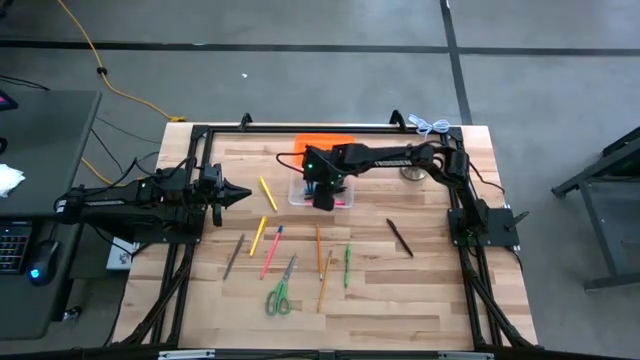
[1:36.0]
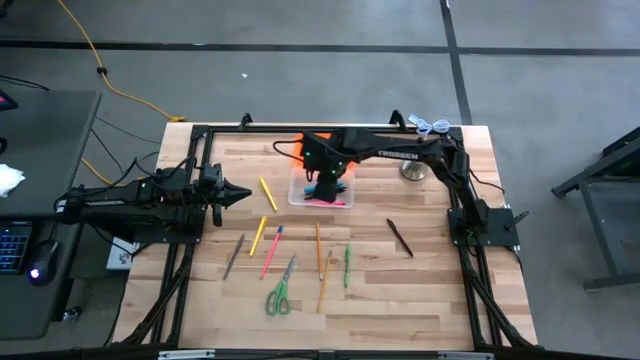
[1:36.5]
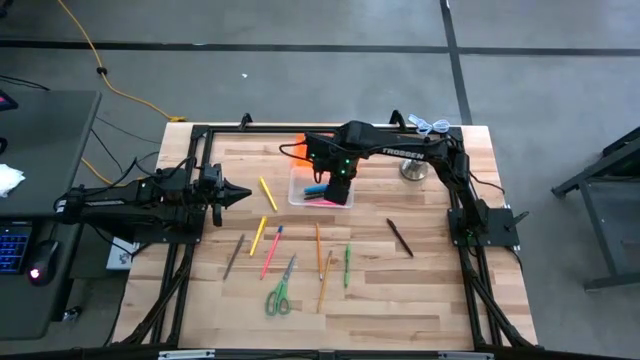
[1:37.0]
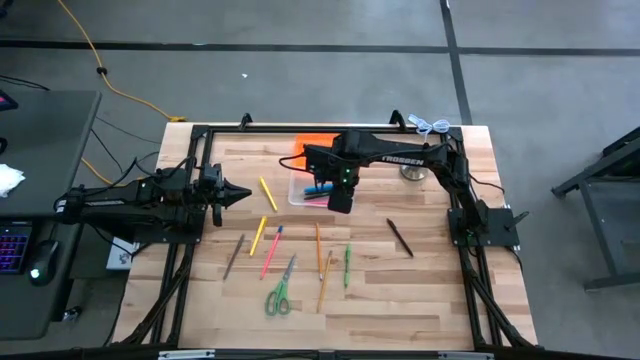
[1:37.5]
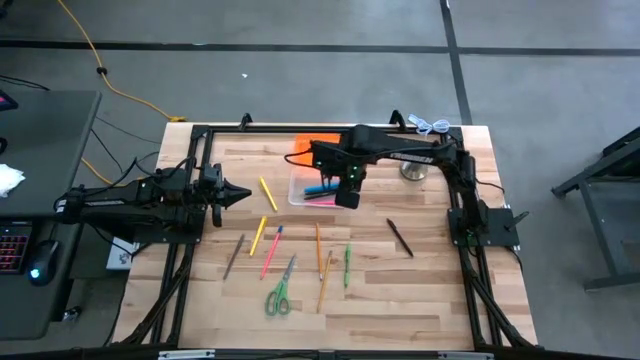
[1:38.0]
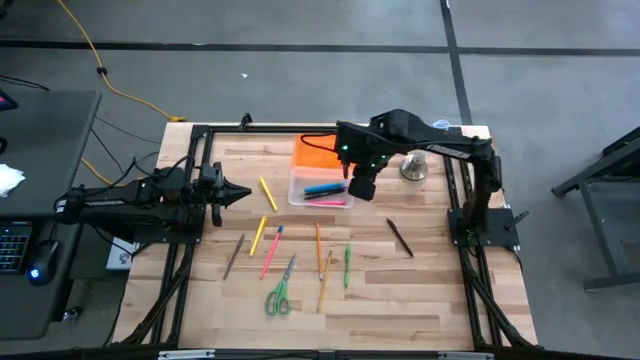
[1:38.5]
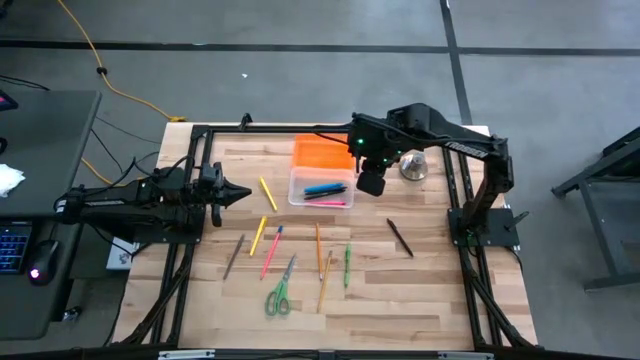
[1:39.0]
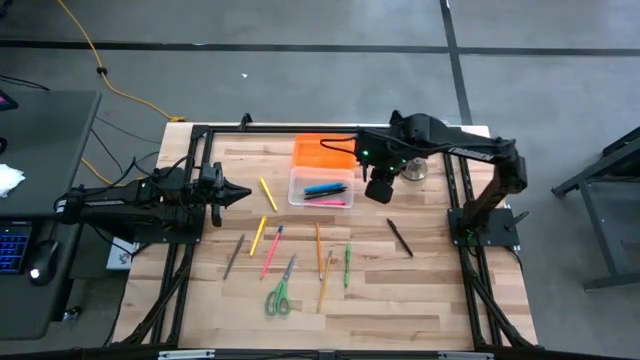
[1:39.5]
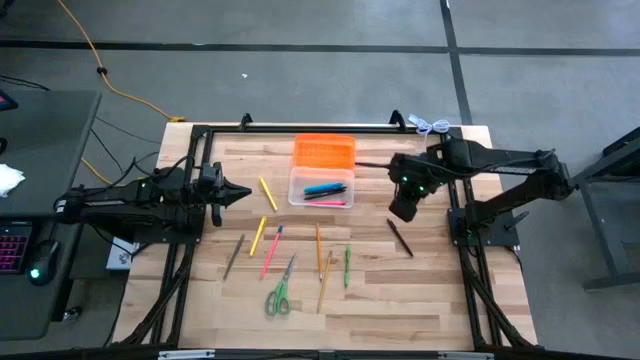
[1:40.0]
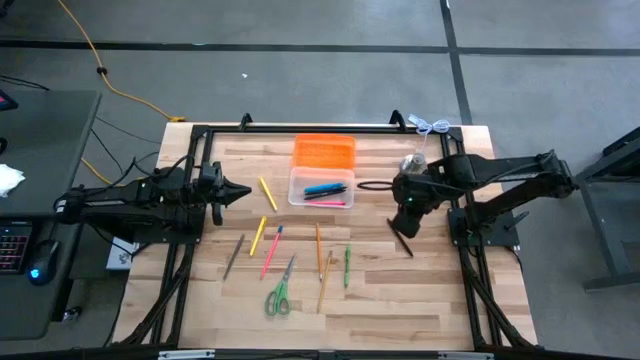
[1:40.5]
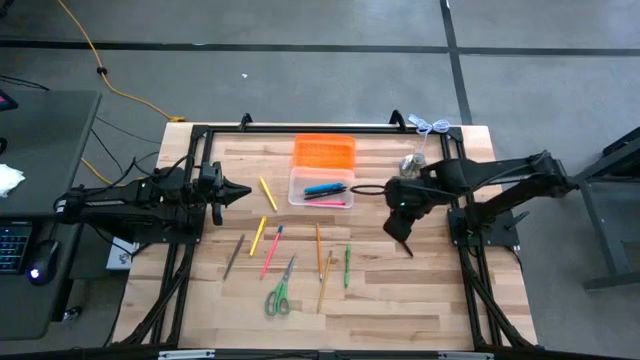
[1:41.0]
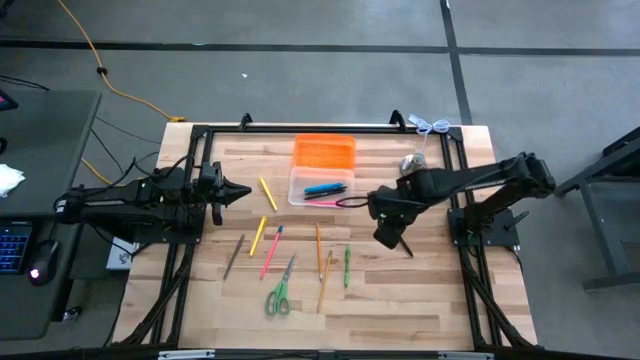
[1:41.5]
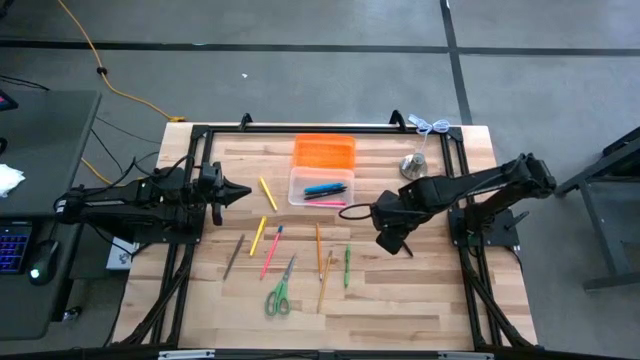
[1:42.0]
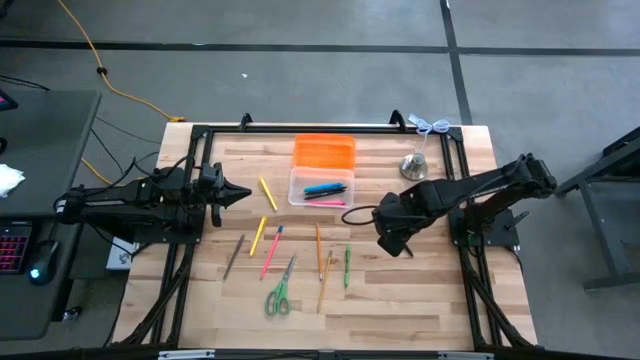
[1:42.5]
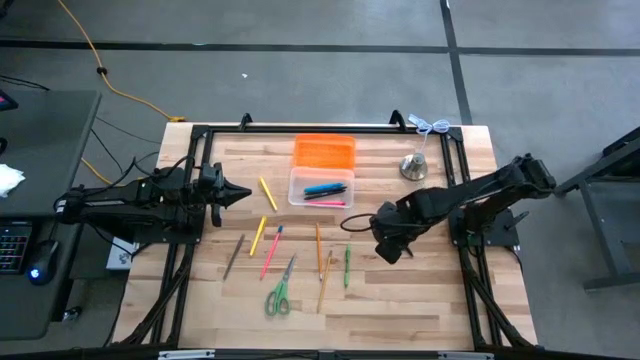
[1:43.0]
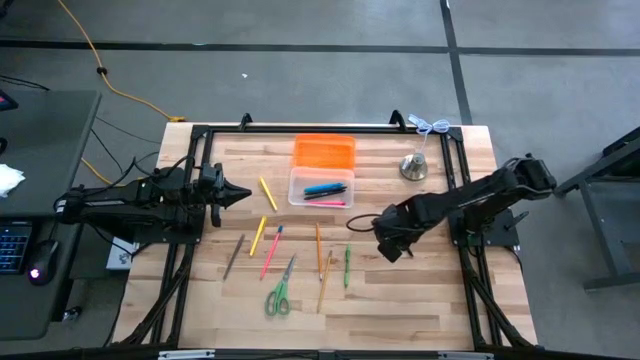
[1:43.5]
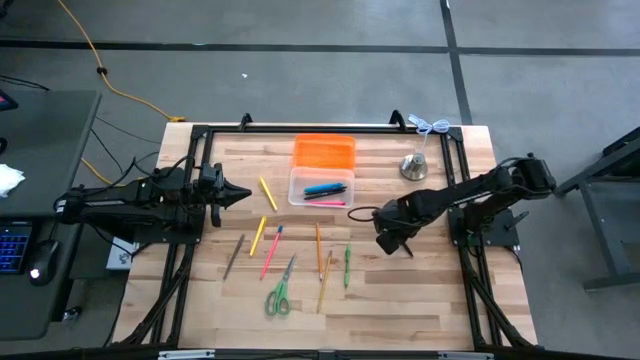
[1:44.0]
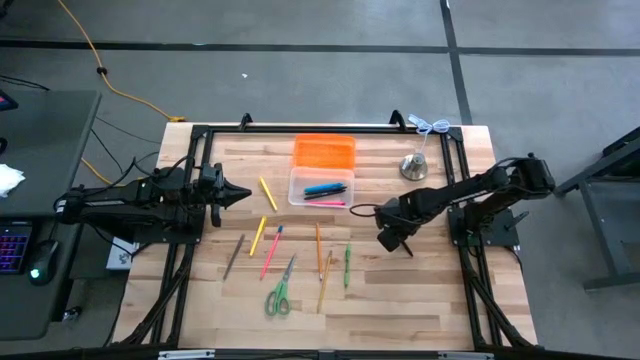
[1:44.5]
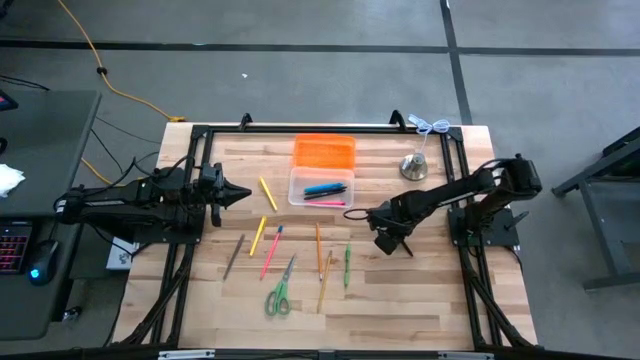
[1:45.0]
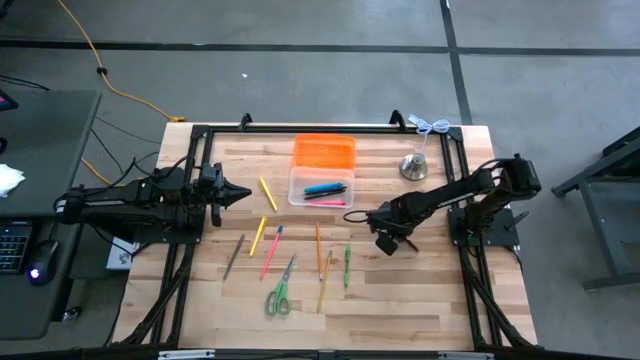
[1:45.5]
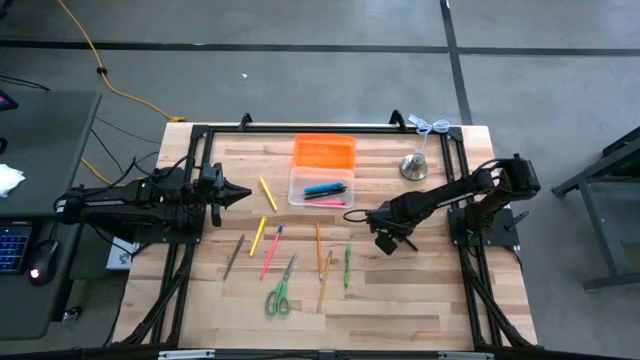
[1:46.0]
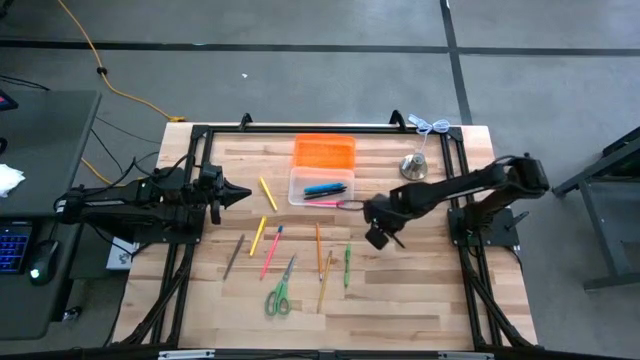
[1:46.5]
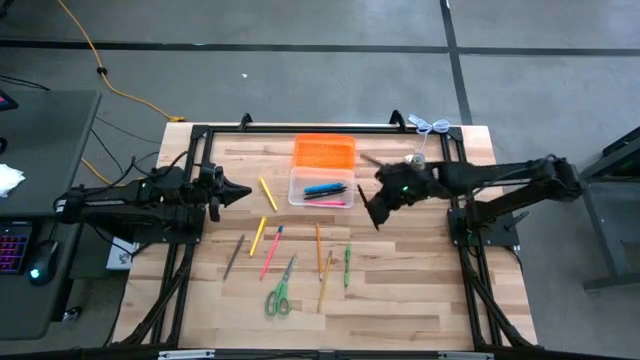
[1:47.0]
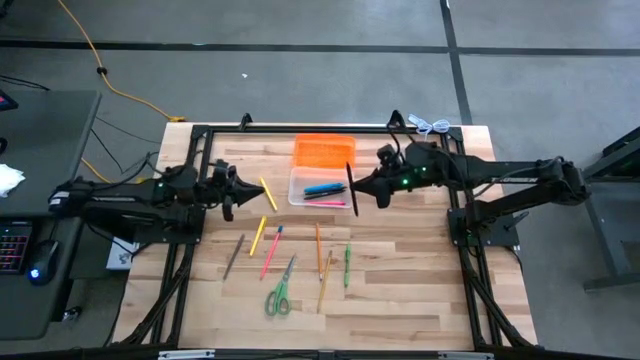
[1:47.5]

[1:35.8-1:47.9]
Task: Pick & place school supplies into a supply box
Put the black pen into the transparent supply box

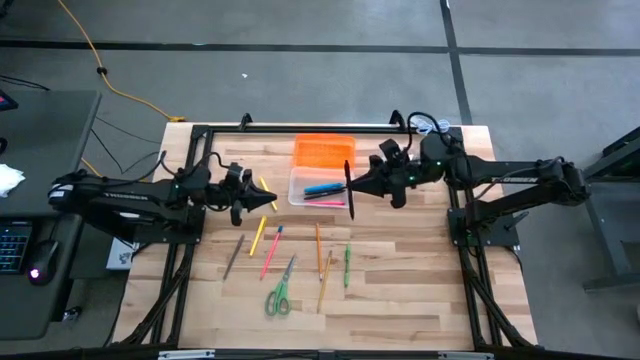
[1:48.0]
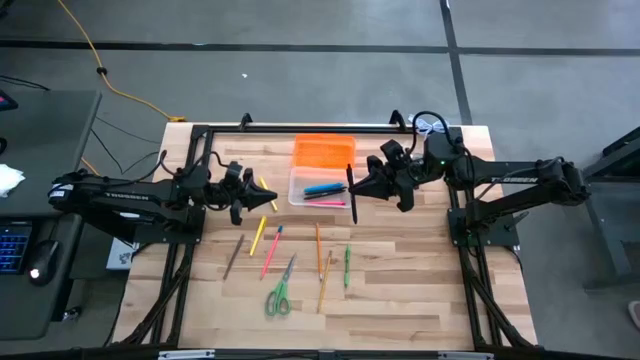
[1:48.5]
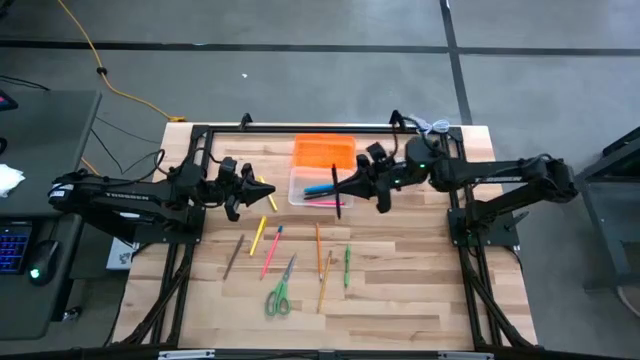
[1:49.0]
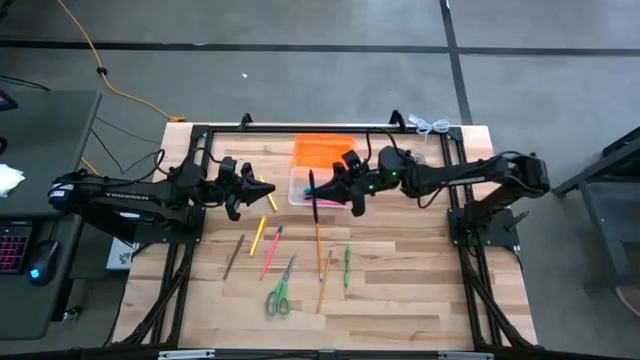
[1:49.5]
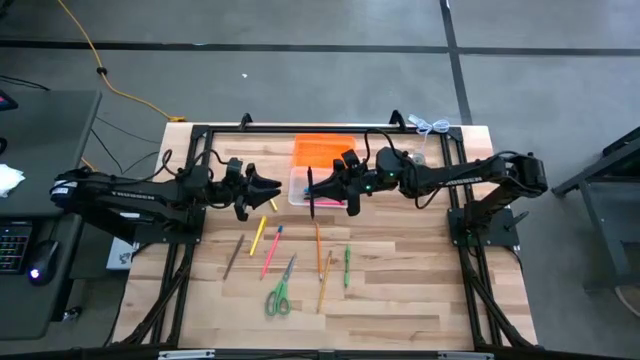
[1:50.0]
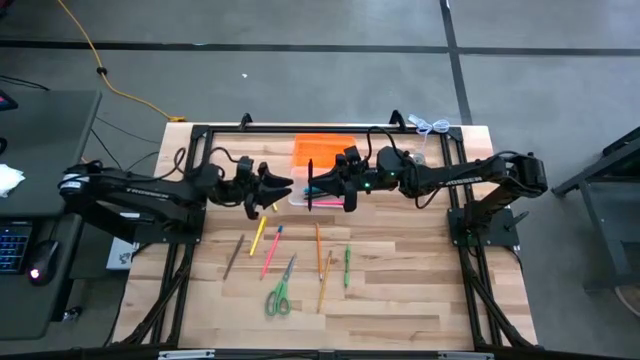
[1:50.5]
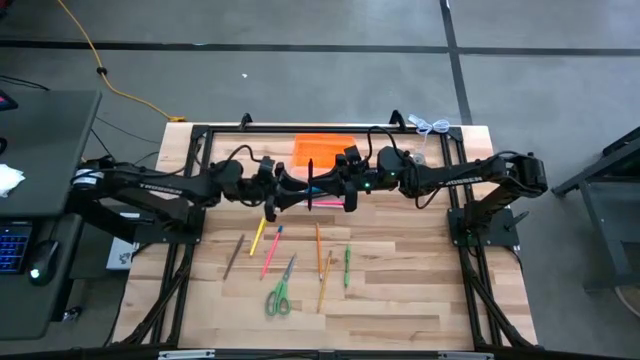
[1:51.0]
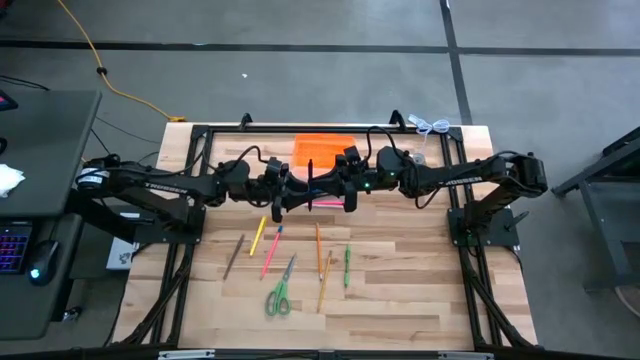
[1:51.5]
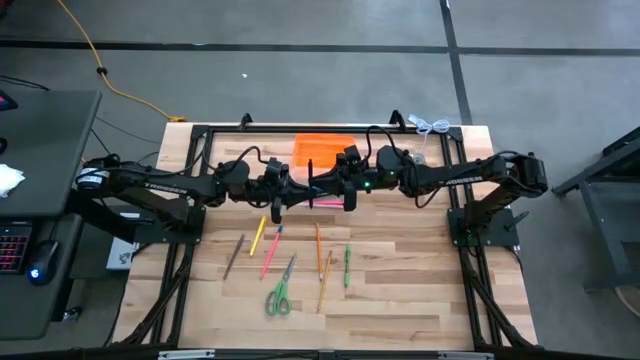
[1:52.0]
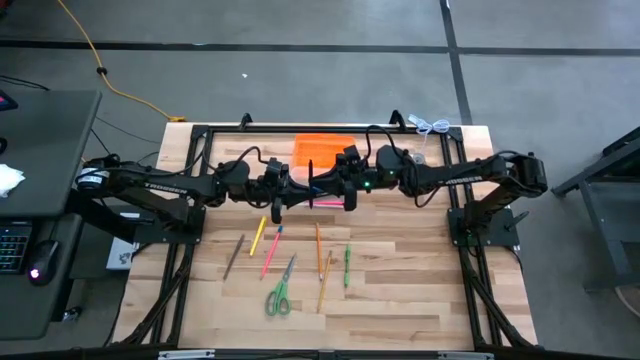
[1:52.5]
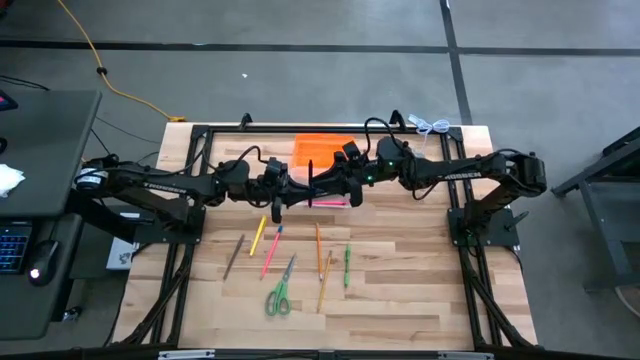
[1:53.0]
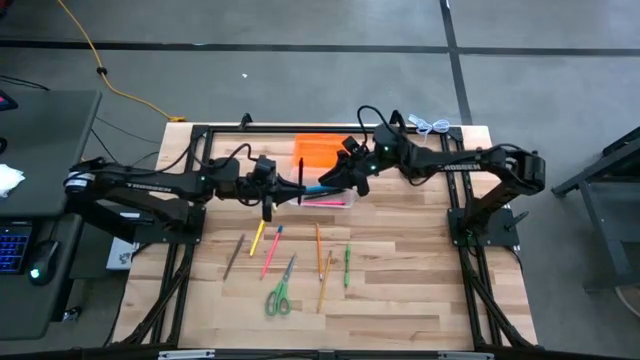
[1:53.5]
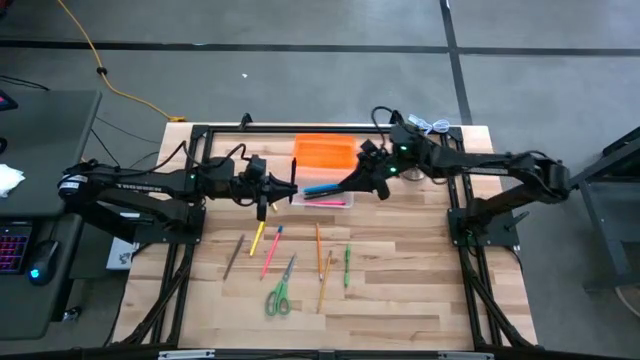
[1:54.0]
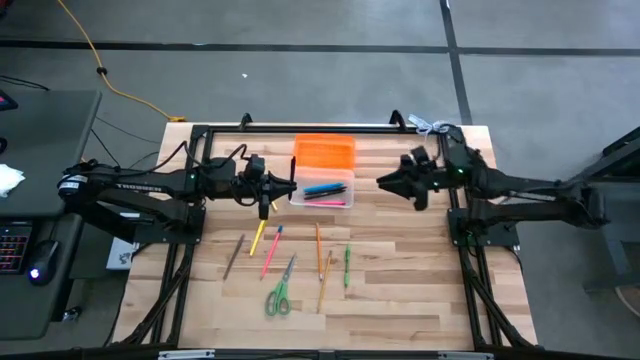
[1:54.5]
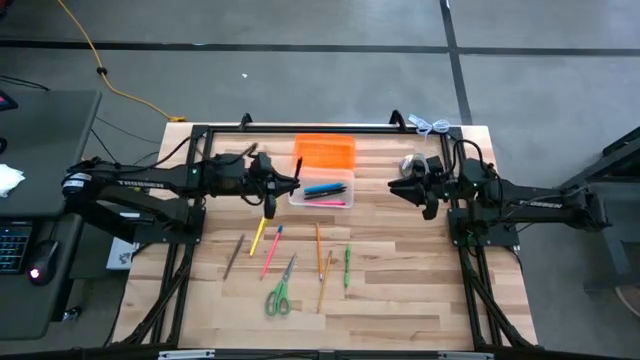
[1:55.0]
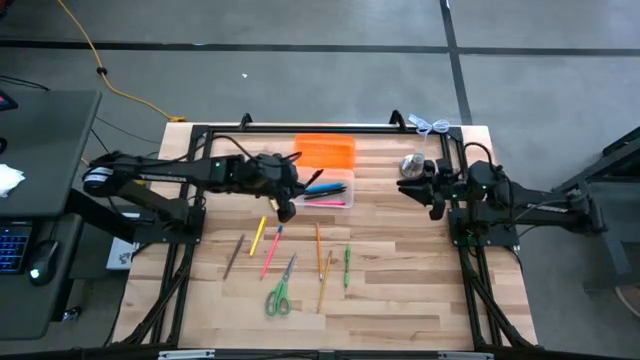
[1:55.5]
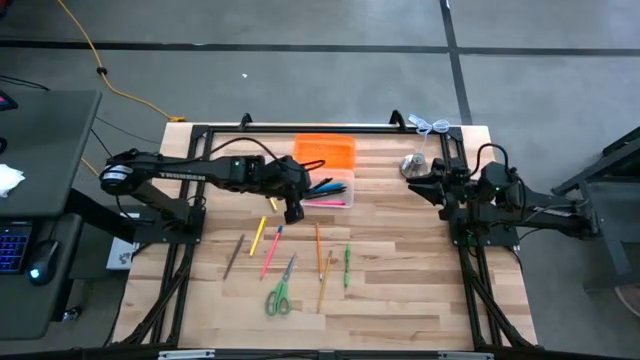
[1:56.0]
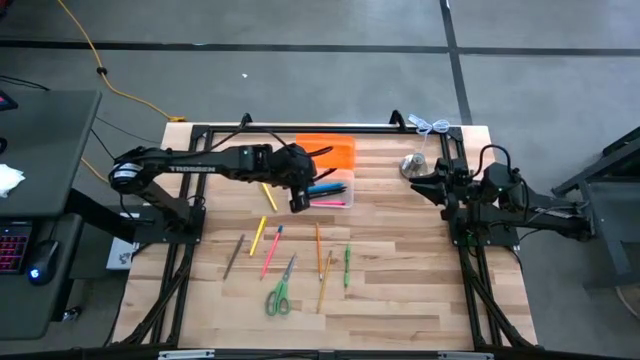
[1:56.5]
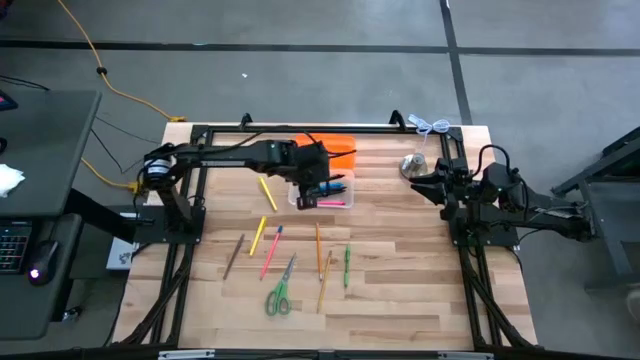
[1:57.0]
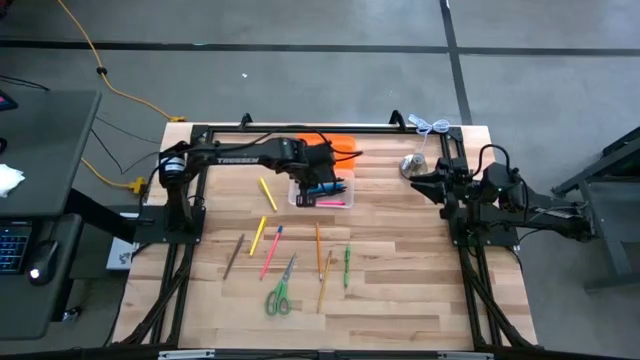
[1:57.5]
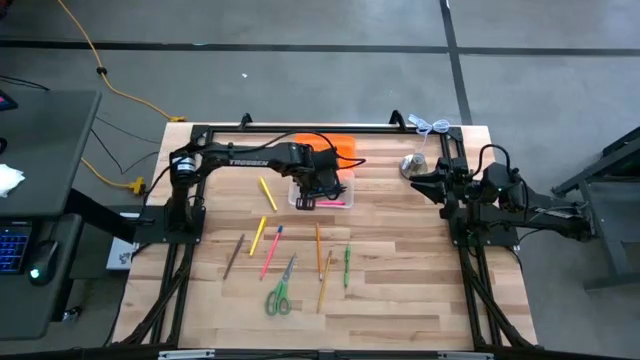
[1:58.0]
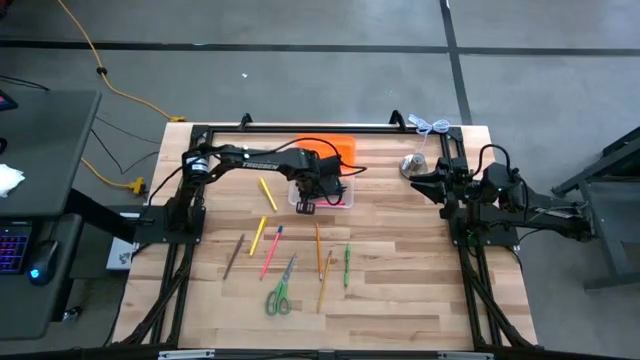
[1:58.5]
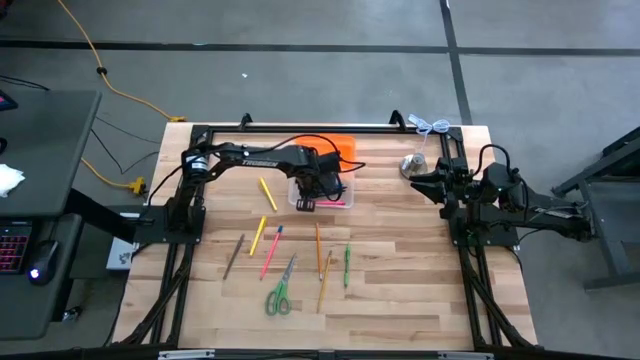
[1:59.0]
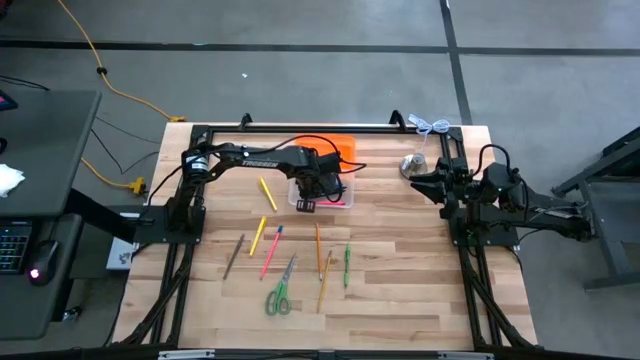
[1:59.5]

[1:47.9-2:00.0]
Put the black pen into the transparent supply box
